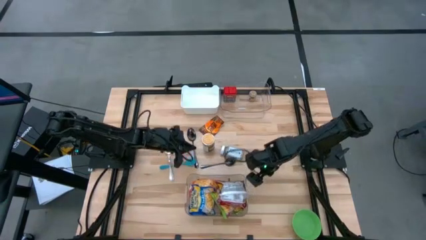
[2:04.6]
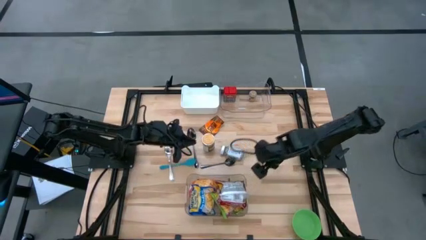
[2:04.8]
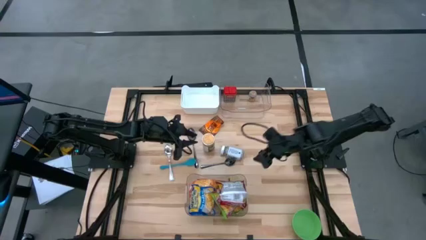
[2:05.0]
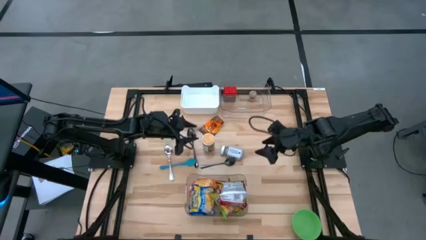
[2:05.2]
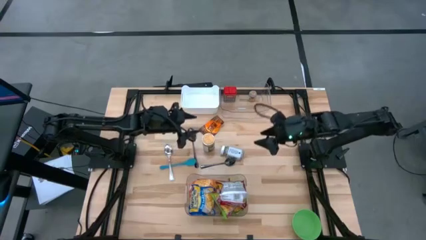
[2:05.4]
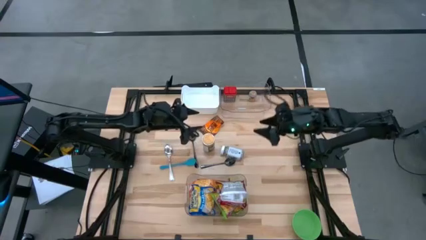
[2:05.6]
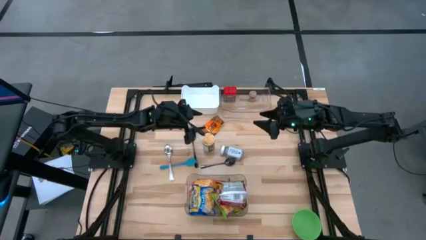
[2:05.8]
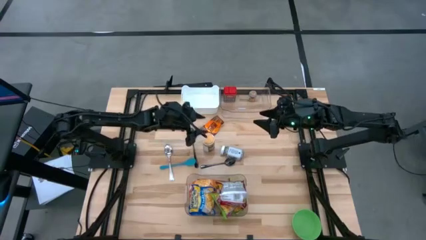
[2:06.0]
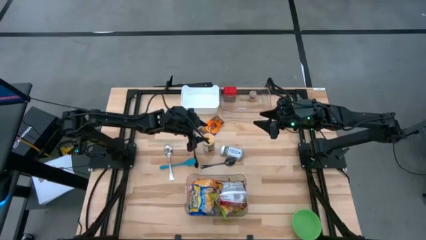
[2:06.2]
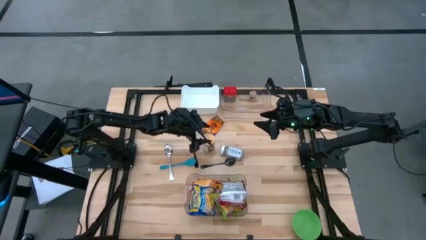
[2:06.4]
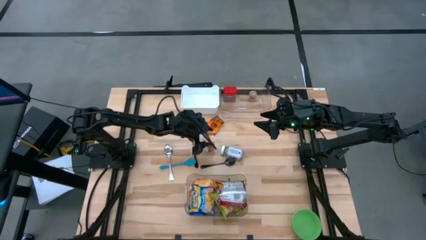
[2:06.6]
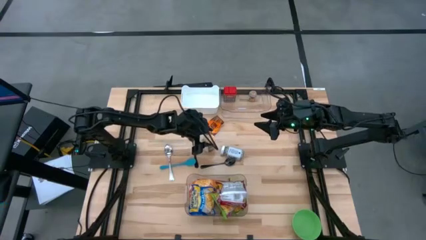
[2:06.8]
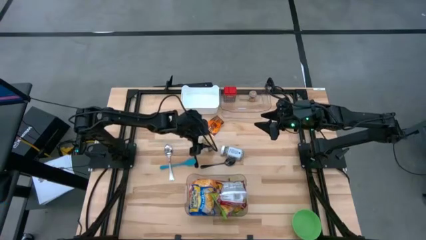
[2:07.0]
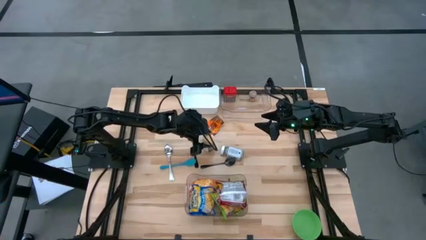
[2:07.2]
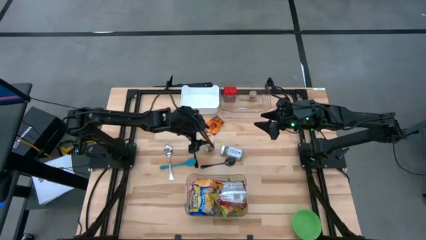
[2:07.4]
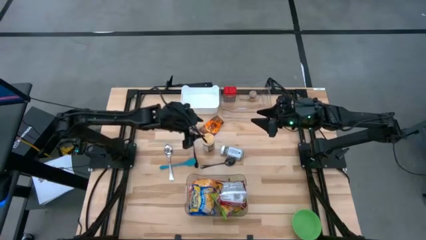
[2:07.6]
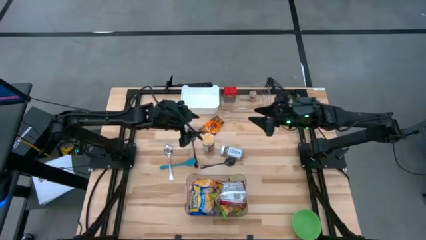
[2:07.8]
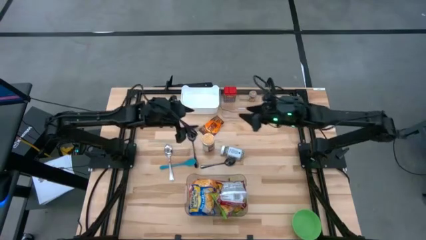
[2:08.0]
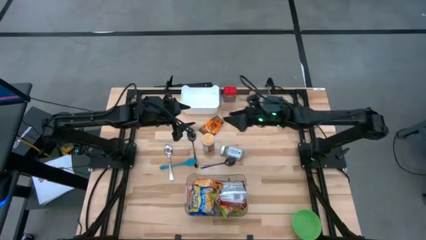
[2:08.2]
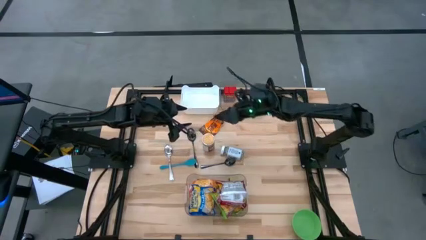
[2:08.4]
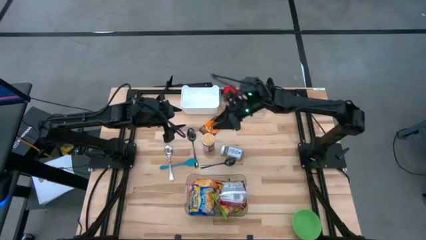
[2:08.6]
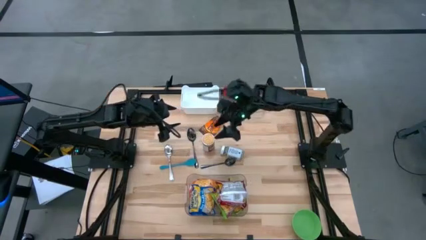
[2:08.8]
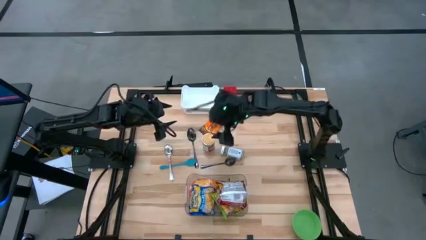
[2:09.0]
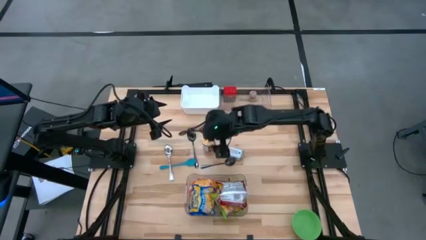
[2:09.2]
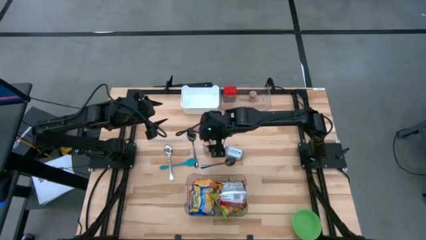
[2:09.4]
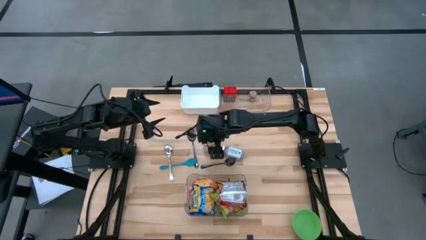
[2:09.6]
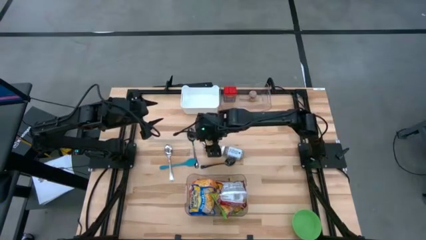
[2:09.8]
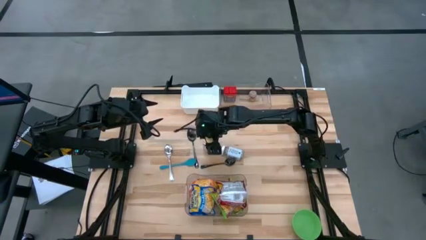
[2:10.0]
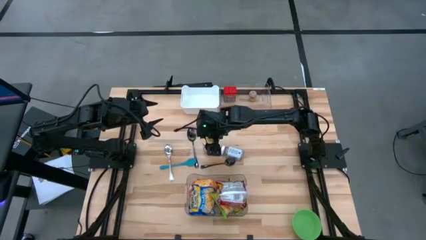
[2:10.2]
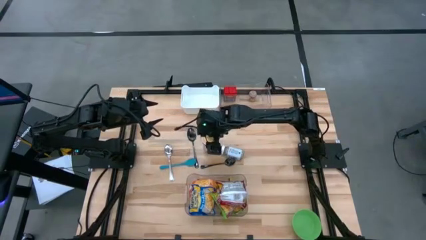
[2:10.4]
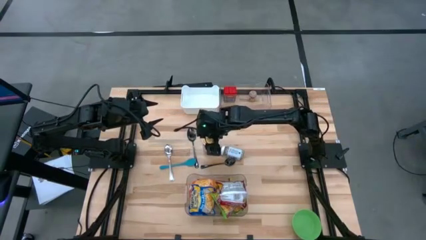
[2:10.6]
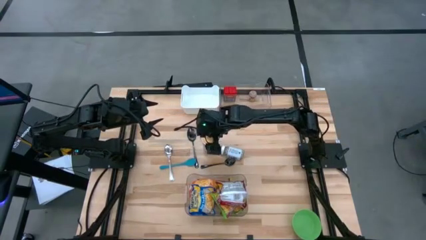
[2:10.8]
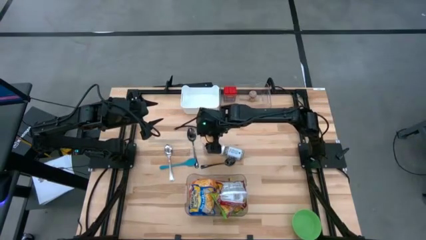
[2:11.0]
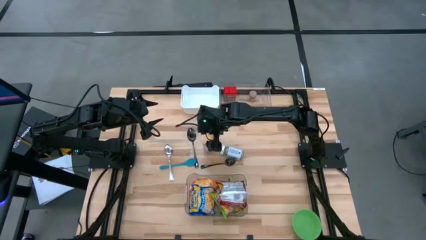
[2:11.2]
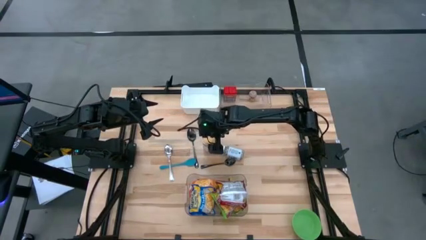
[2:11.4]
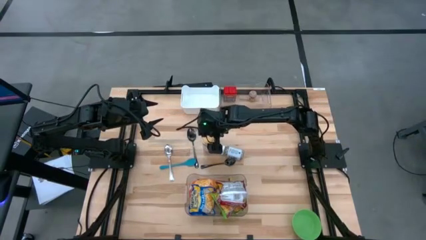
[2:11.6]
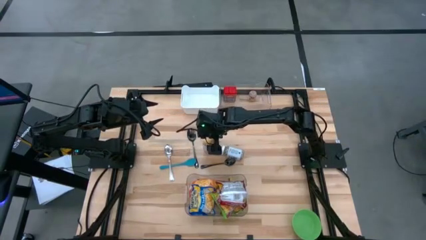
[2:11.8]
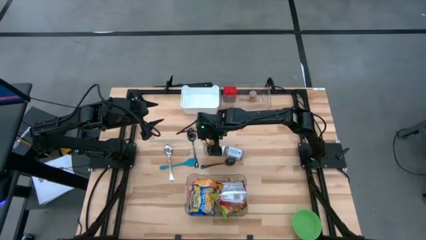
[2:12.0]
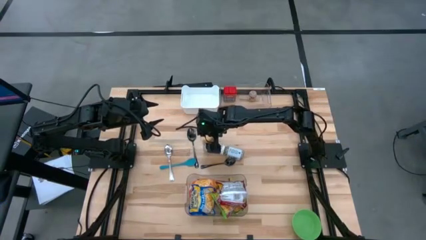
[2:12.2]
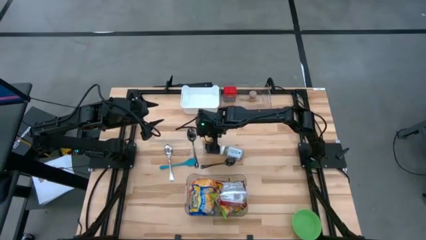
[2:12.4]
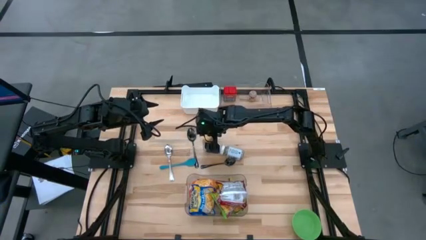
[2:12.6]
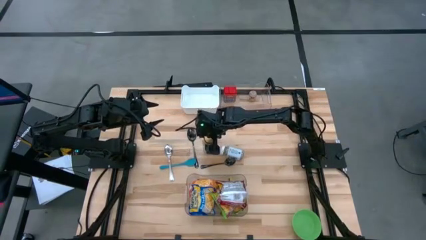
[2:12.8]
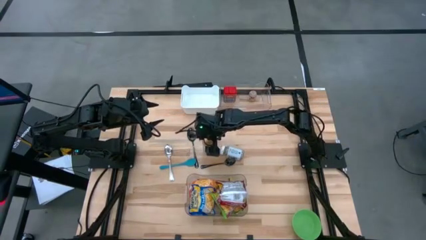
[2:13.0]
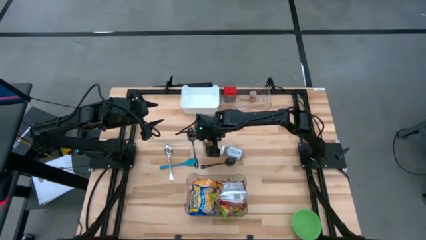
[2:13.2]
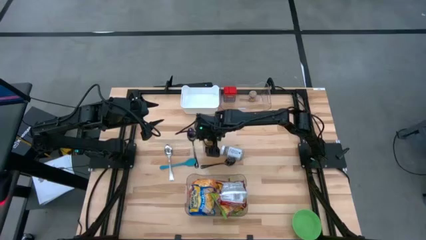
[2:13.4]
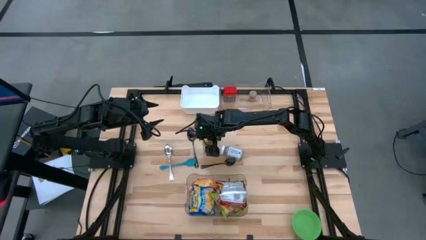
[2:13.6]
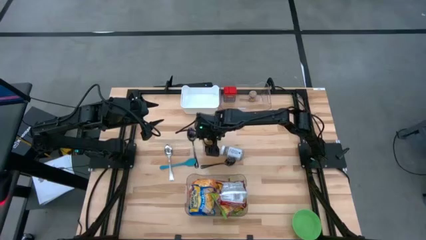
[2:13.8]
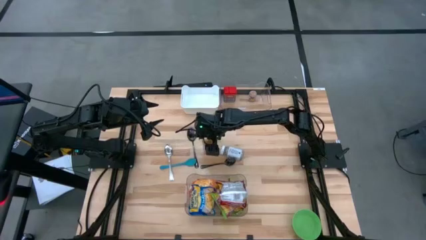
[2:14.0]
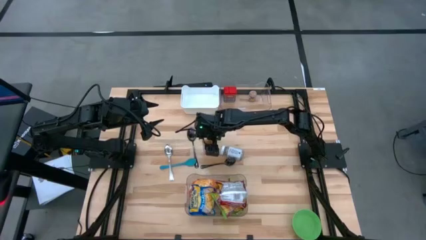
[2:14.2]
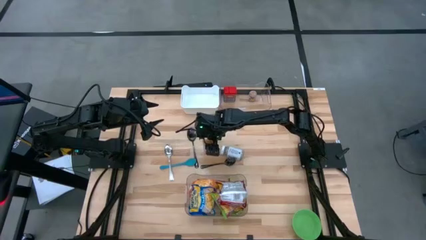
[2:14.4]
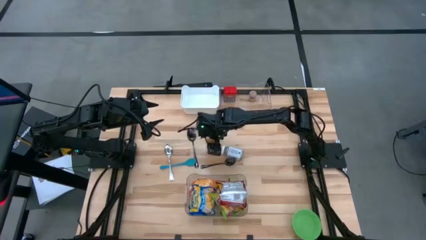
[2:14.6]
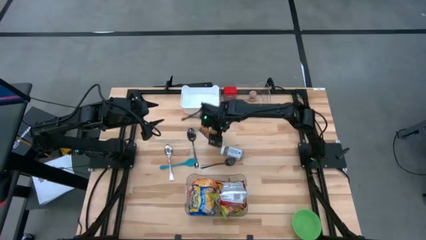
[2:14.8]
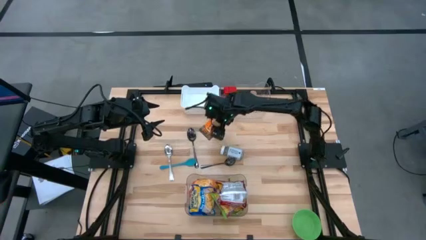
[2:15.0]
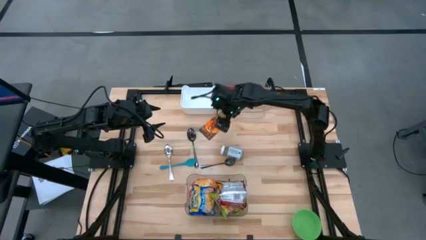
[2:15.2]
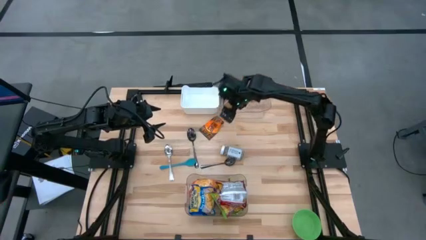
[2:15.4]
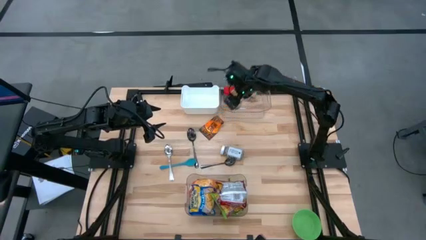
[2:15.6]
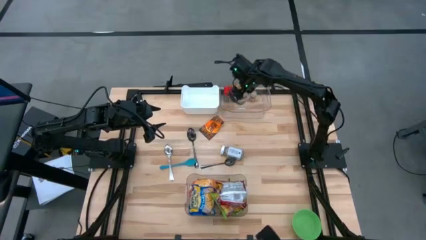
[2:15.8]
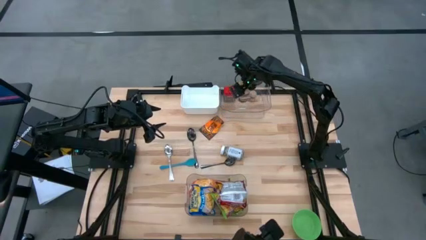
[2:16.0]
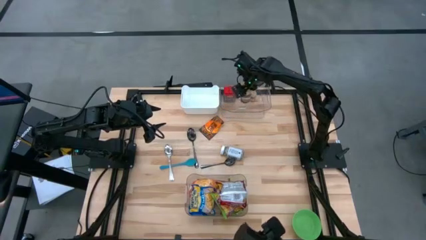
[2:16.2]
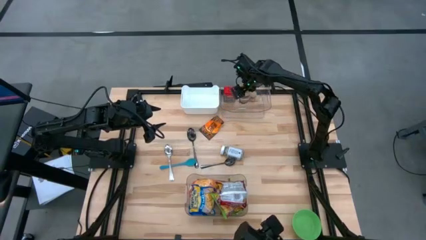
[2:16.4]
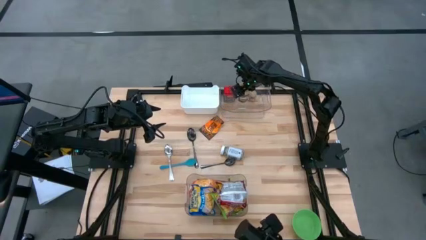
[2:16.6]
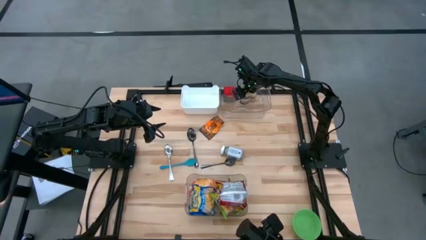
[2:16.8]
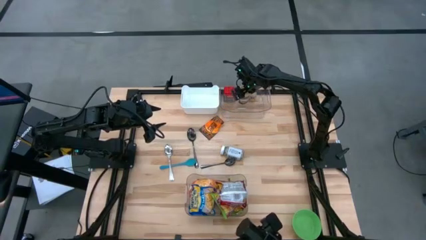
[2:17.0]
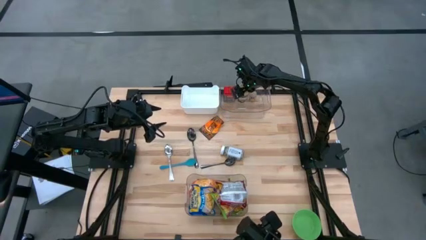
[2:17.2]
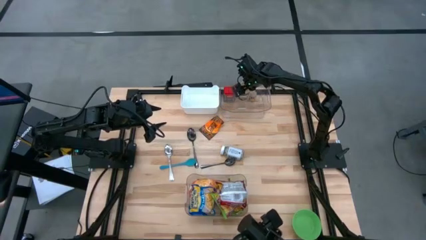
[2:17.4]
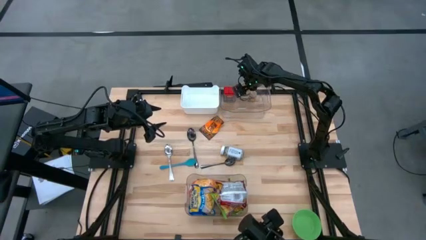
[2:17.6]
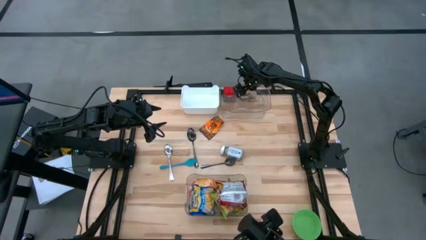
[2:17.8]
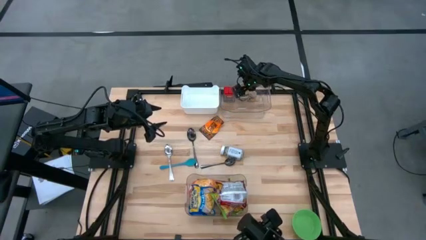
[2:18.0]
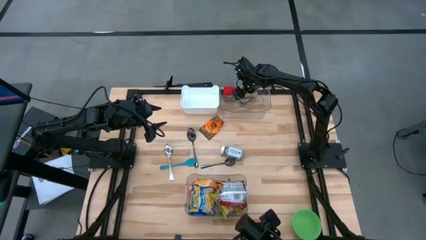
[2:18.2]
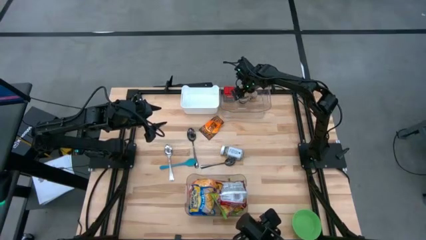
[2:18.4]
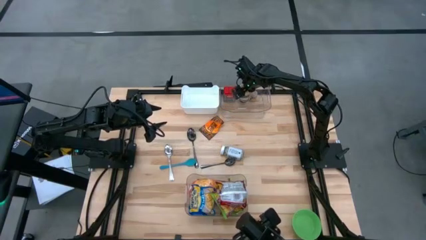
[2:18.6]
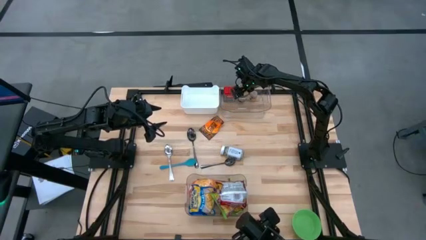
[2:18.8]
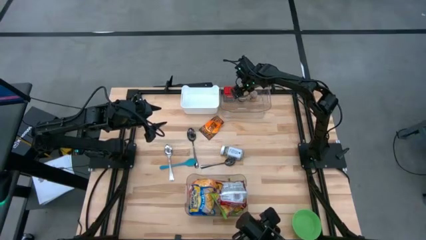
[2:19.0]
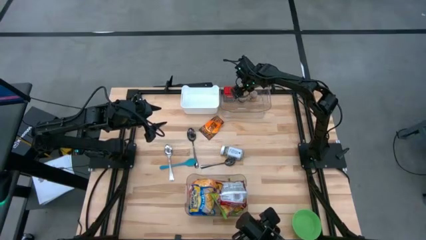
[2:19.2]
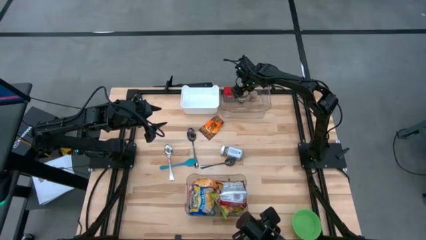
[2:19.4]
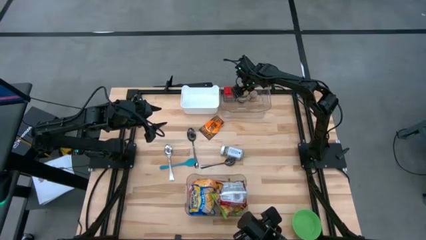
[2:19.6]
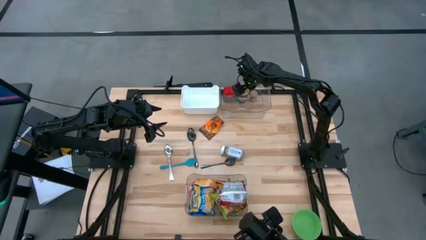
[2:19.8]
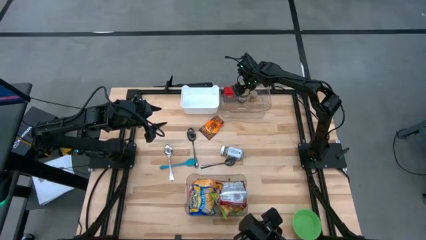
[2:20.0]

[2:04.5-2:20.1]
Task: Pick & Place Food Item
Put the gold seasoning into the top transparent bin
